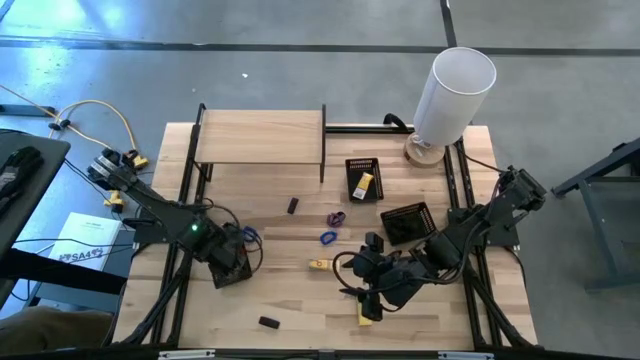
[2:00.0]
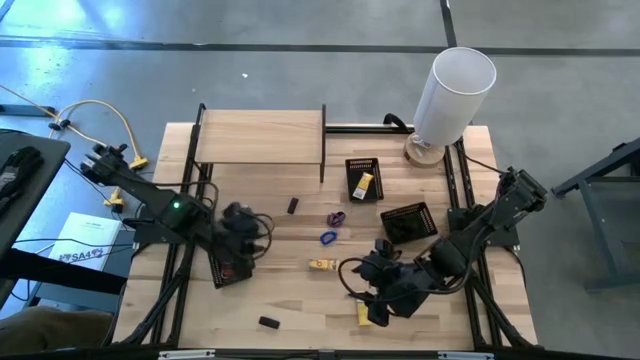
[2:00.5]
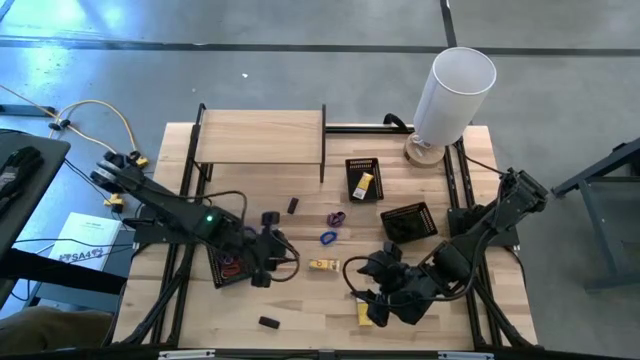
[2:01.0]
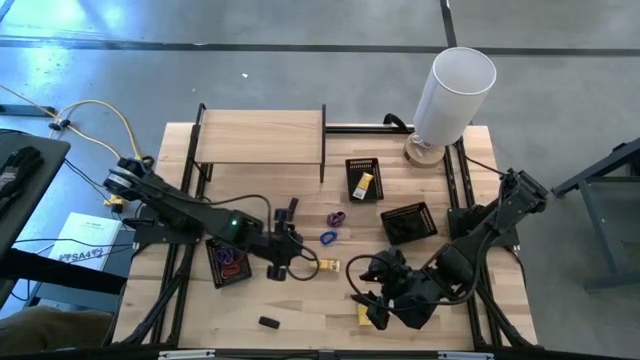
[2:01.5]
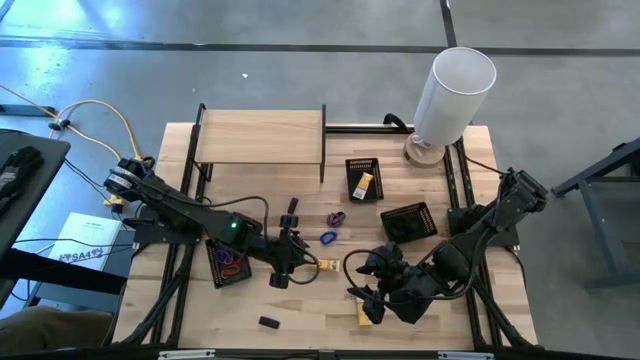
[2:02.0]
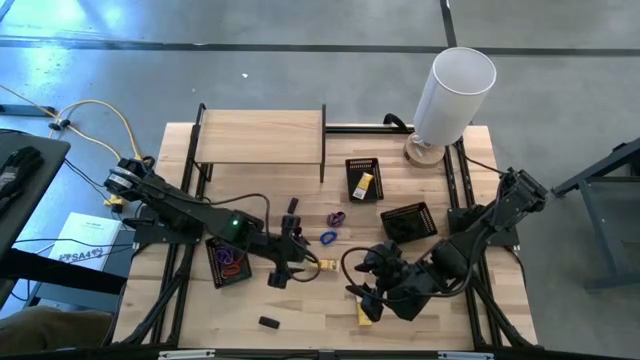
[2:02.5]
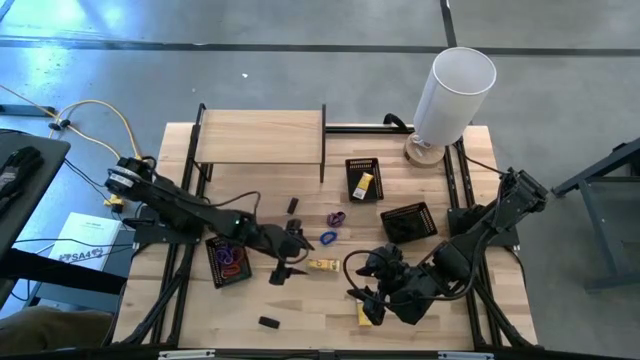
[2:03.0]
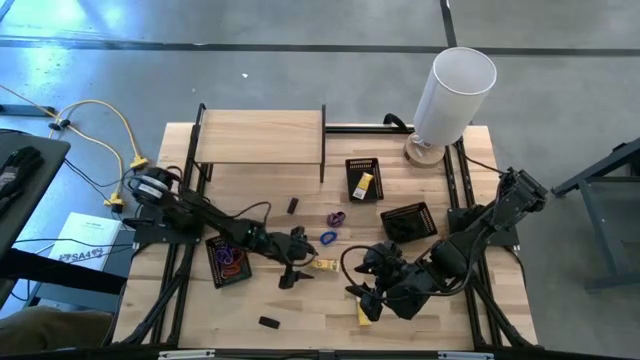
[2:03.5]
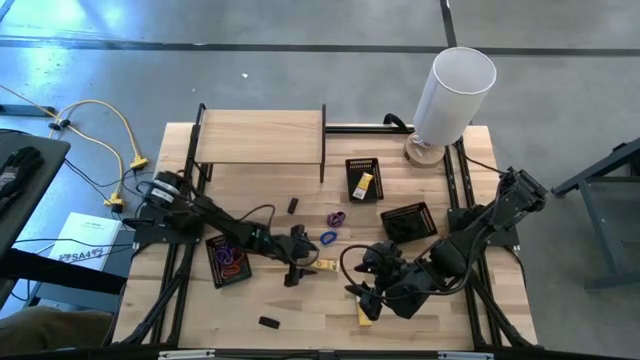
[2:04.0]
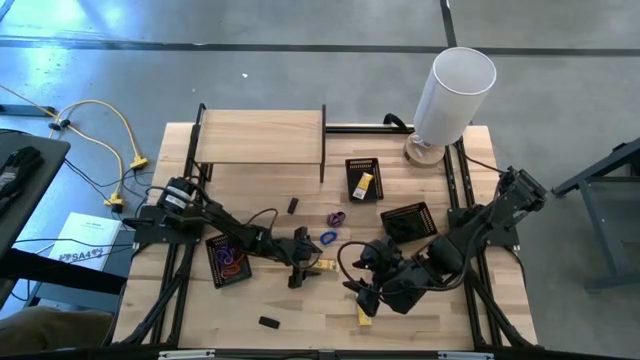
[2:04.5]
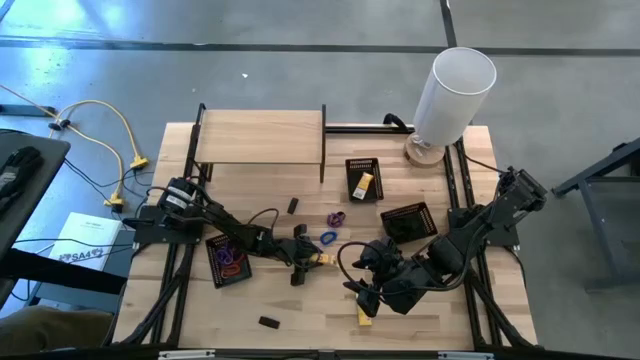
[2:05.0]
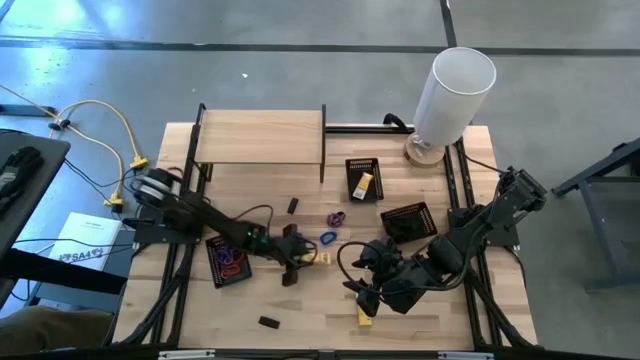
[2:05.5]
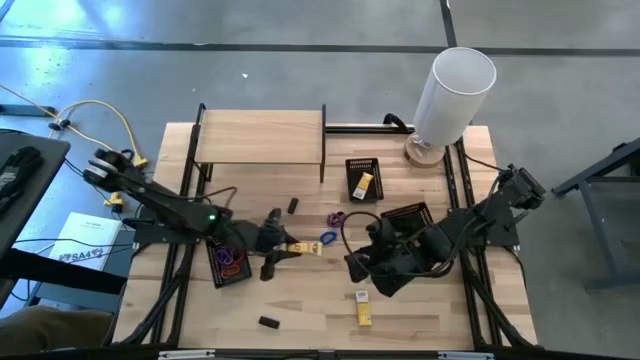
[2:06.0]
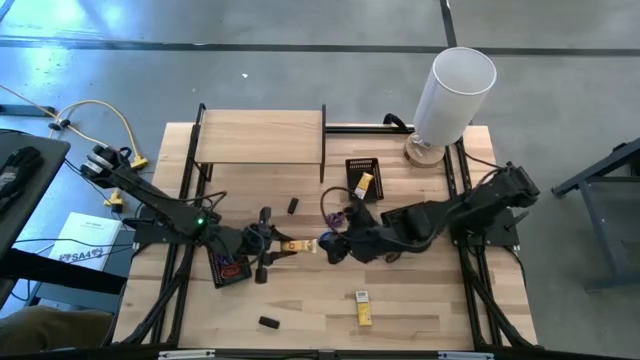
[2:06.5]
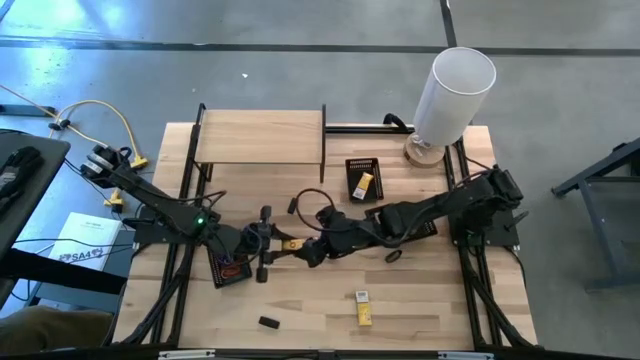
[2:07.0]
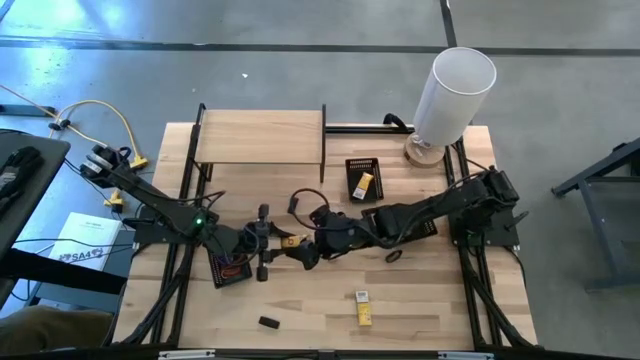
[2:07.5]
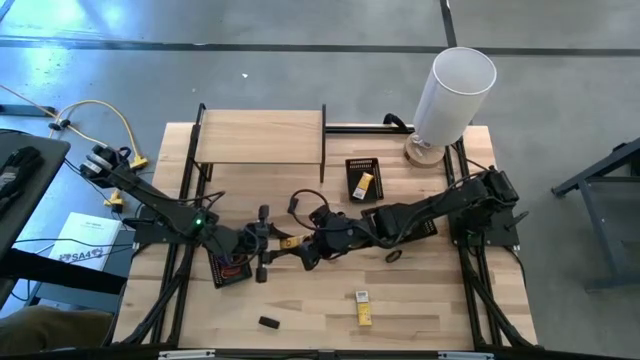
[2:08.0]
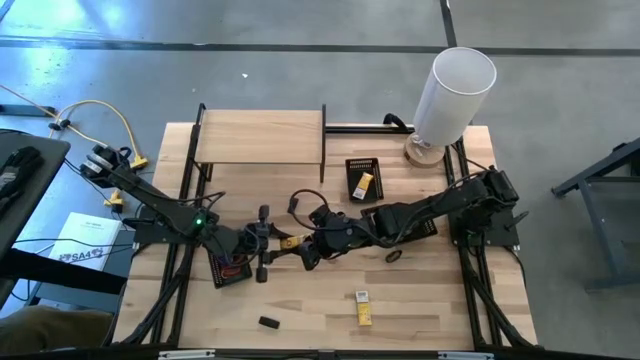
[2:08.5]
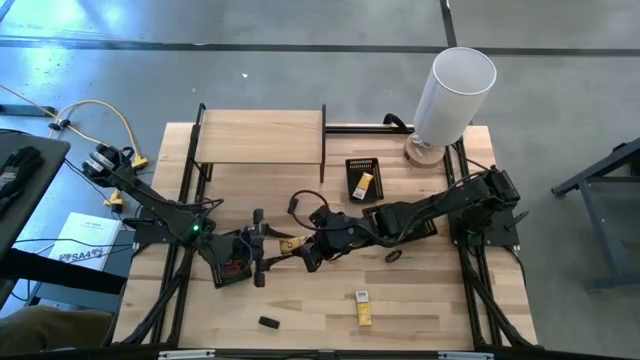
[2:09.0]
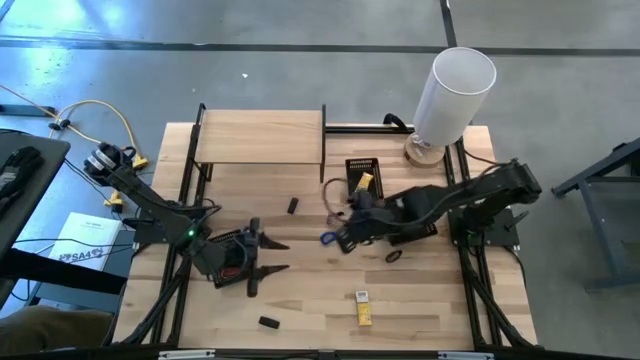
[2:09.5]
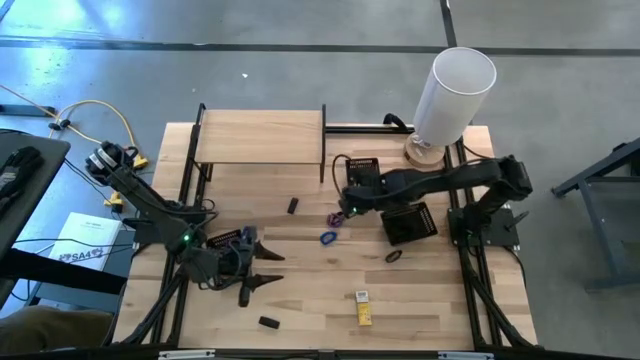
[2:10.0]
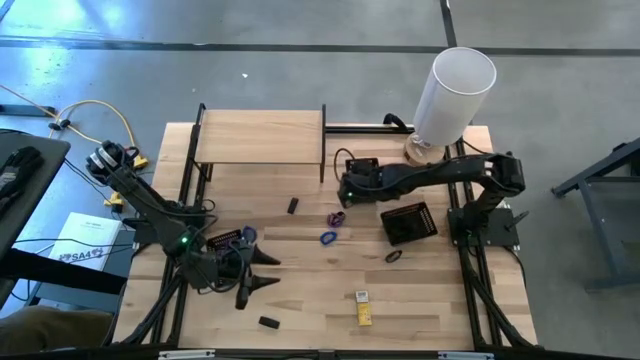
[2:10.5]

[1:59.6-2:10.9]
Task: Pick & Place Office Desk Supplies
Put the crayon box into the top black bin

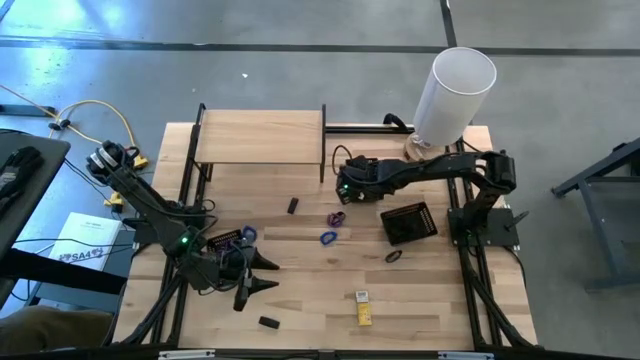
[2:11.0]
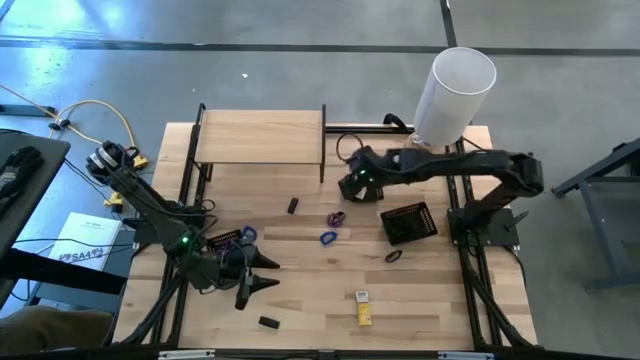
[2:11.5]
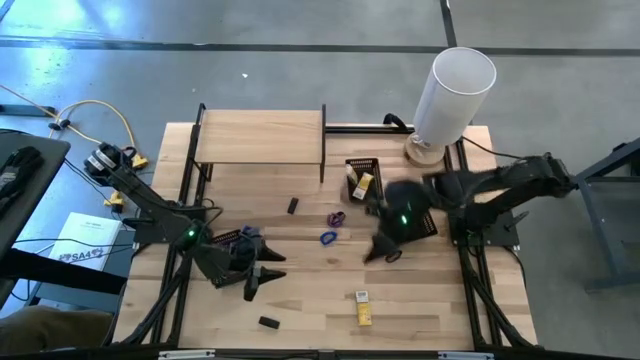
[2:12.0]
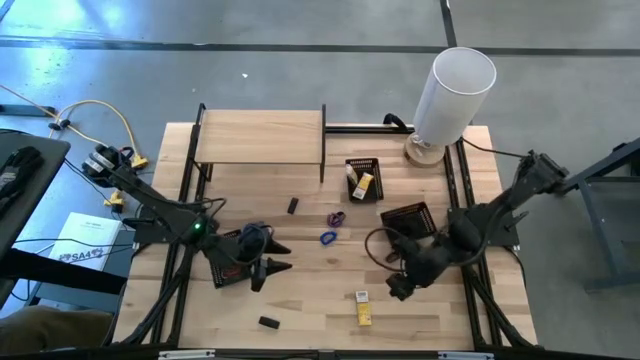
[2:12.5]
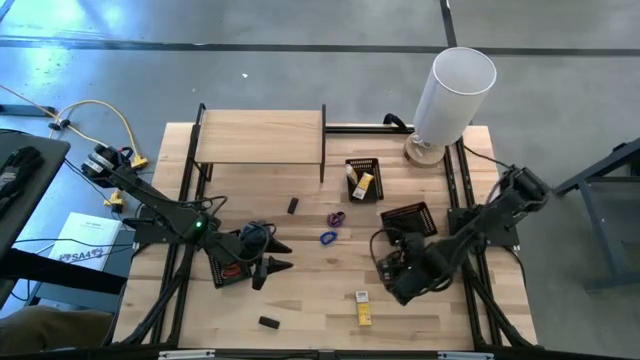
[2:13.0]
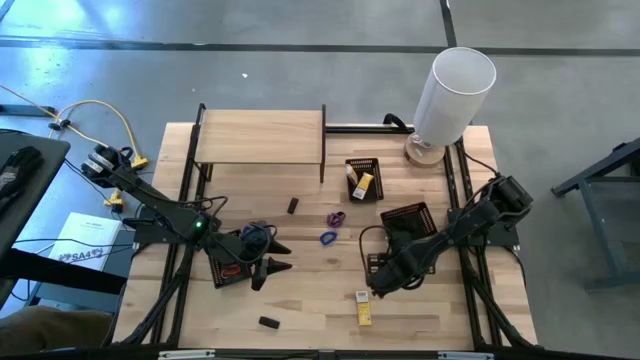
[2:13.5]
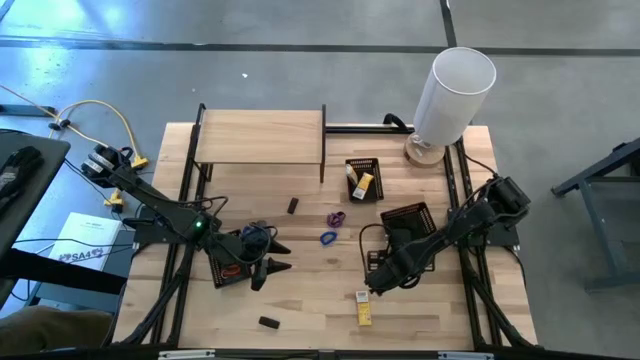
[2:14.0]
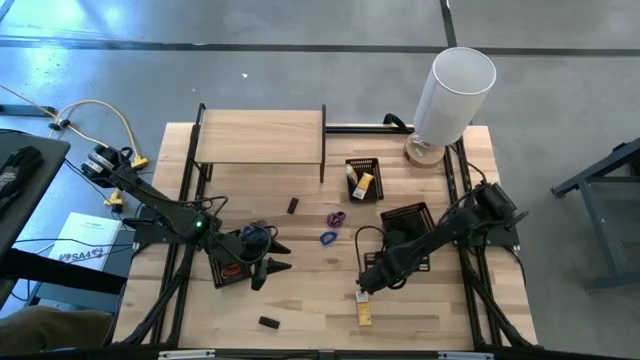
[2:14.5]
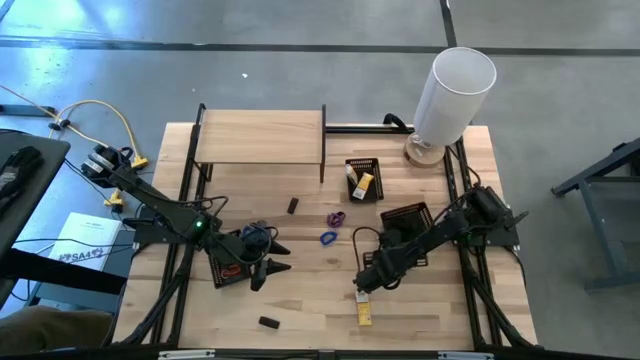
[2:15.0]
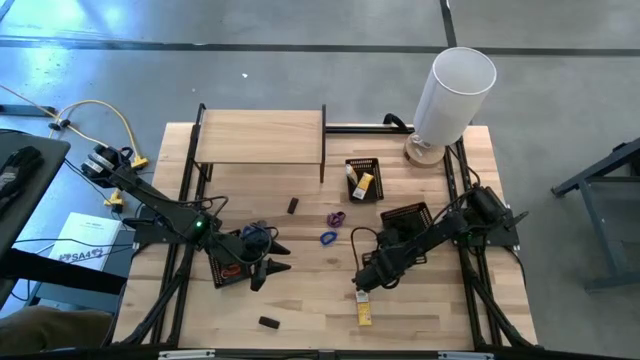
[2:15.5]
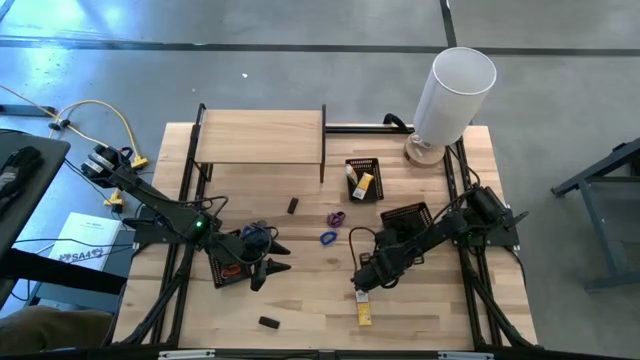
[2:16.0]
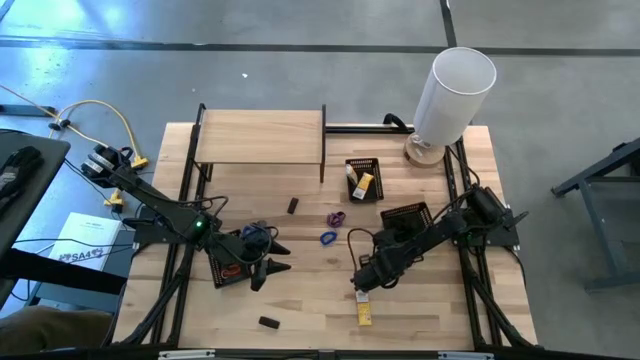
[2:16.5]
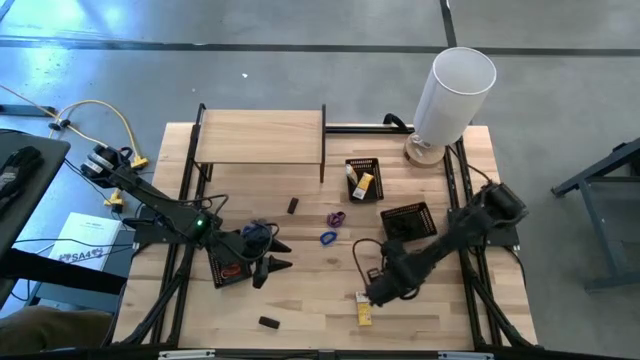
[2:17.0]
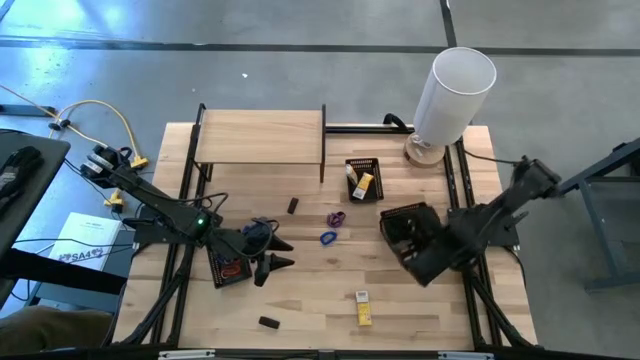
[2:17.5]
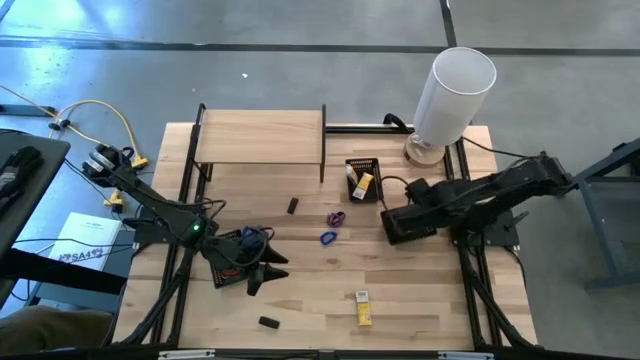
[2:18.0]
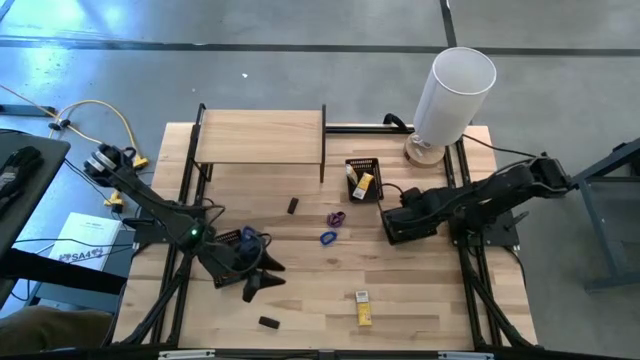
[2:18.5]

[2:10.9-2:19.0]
Put the black rubberband into the bottom right black bin

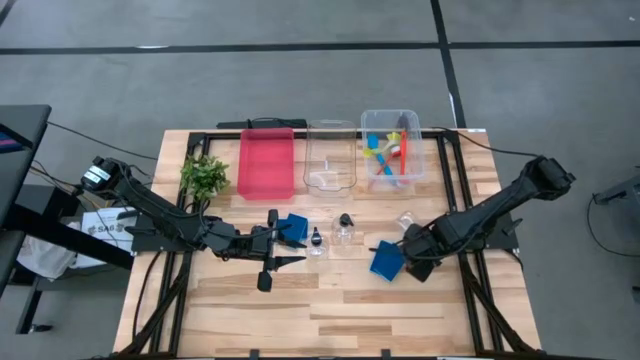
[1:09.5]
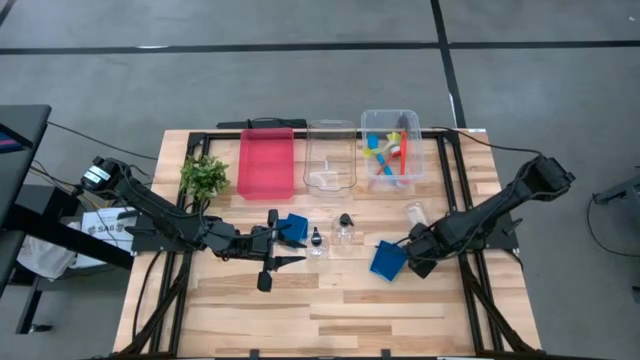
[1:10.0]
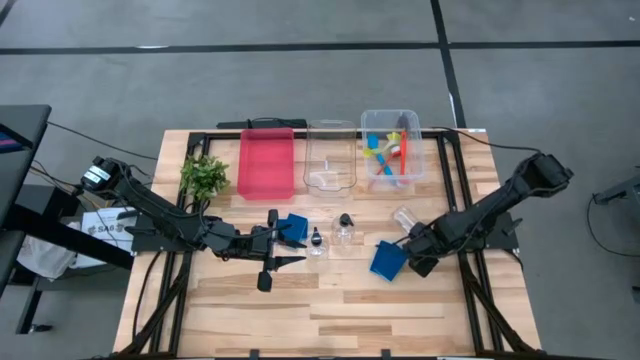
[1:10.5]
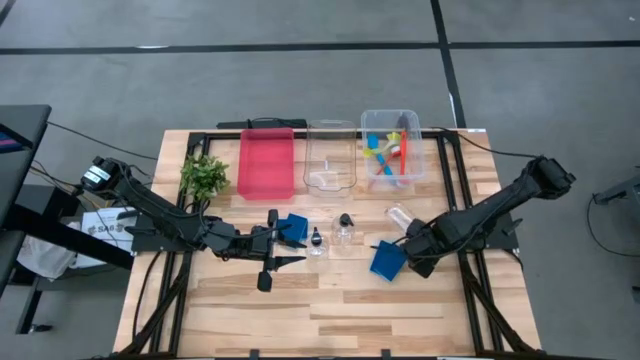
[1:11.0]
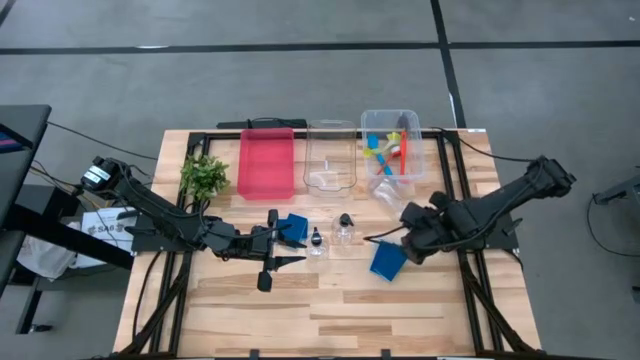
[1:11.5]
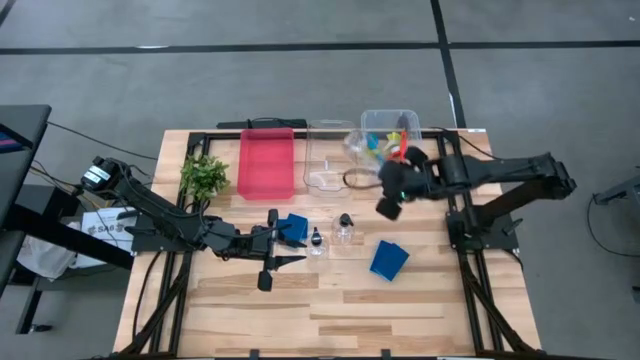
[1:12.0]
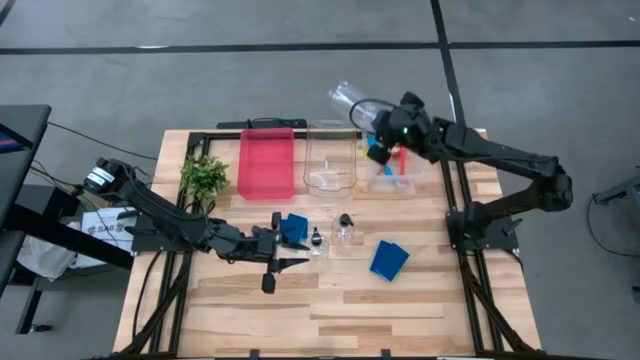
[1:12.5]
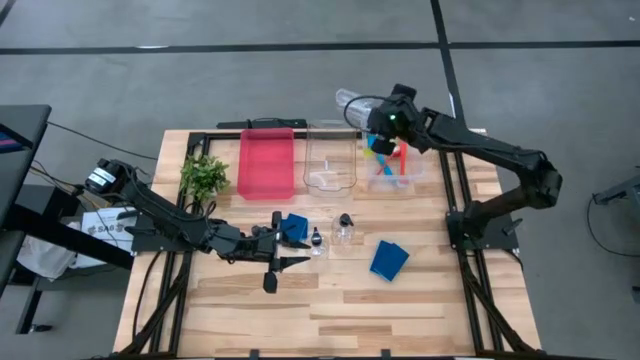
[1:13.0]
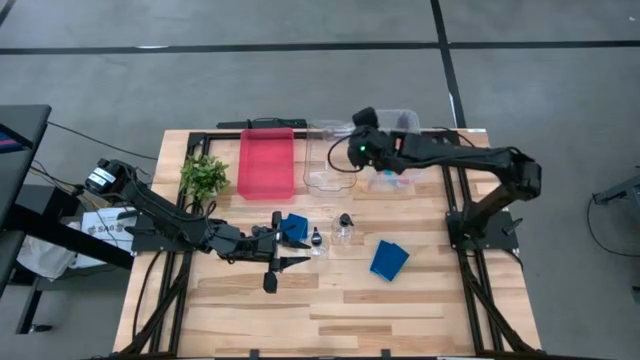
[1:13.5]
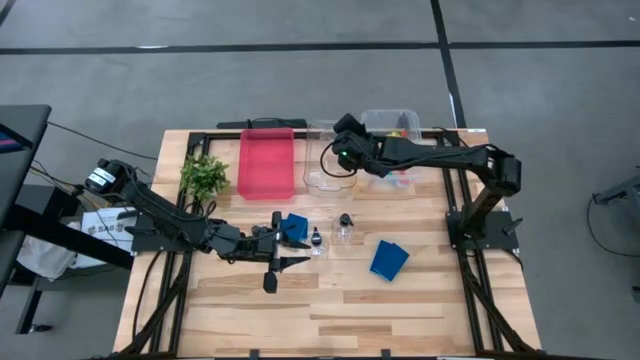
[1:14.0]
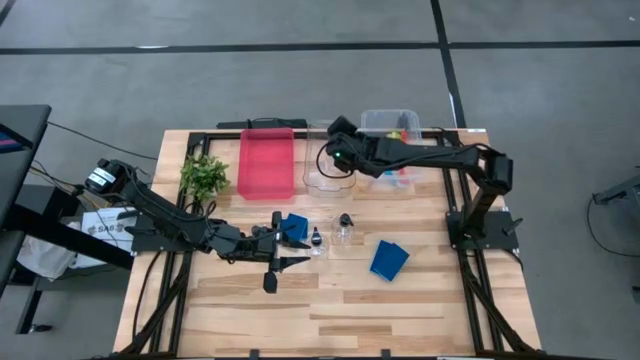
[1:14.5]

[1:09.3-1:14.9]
Task: Pick & Place Kitchen Sink Supplies
Put the soap dispenser into the transparent bin
